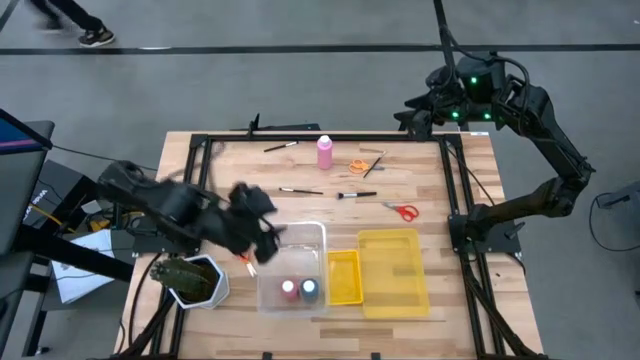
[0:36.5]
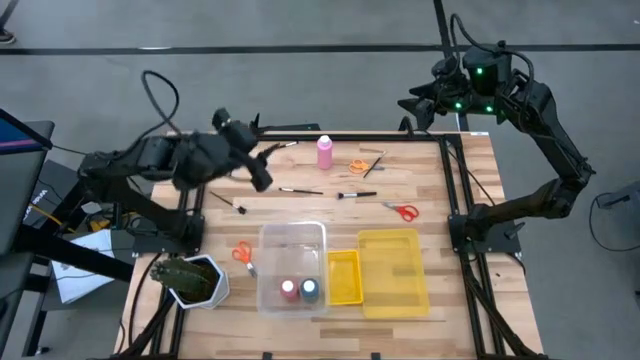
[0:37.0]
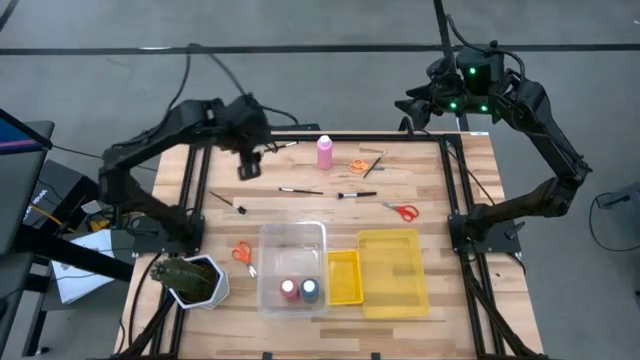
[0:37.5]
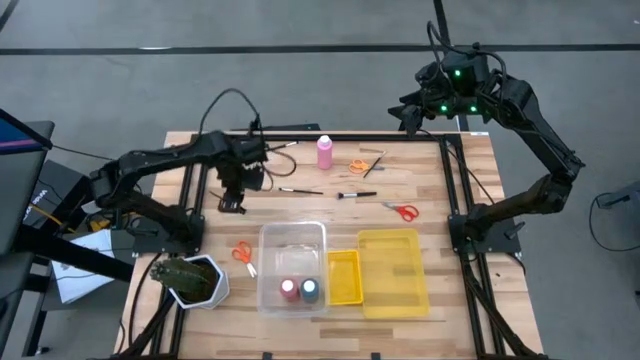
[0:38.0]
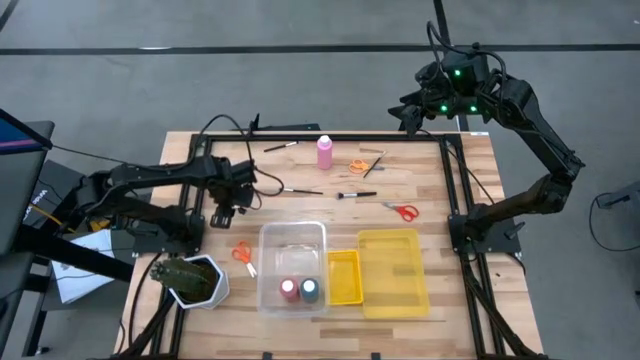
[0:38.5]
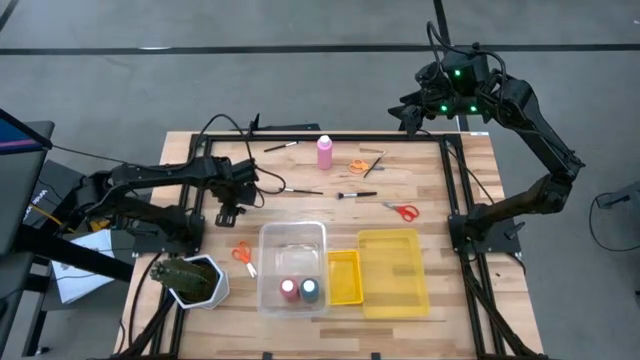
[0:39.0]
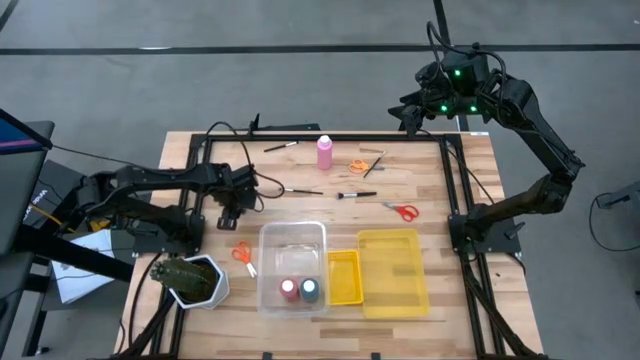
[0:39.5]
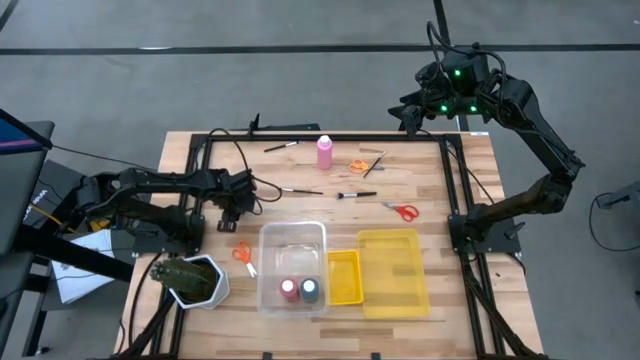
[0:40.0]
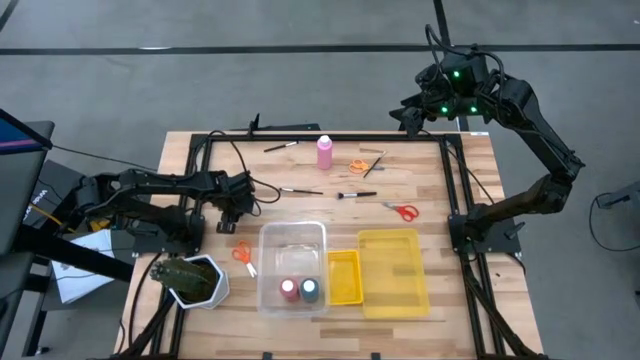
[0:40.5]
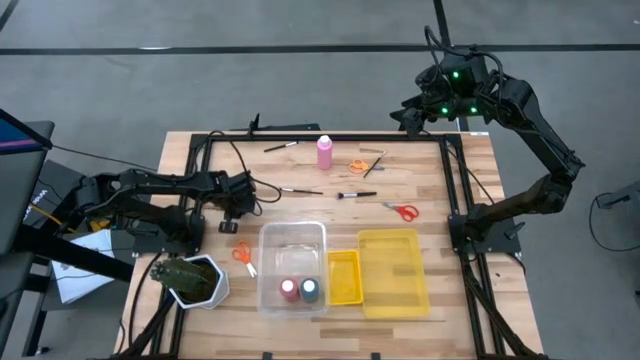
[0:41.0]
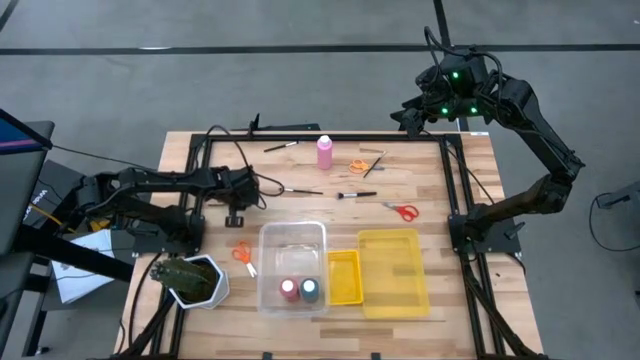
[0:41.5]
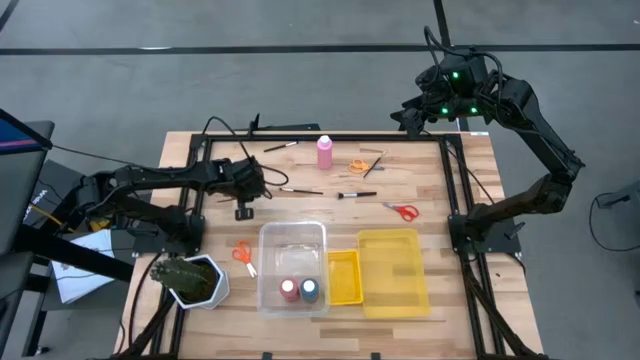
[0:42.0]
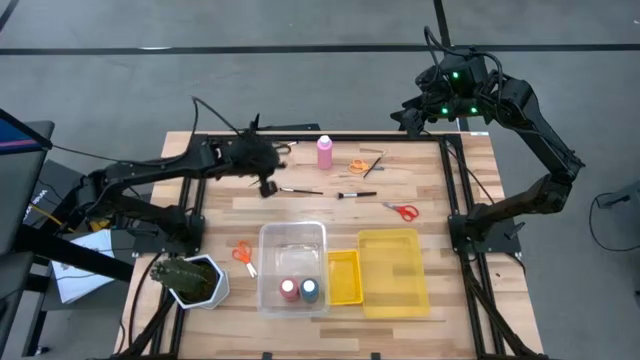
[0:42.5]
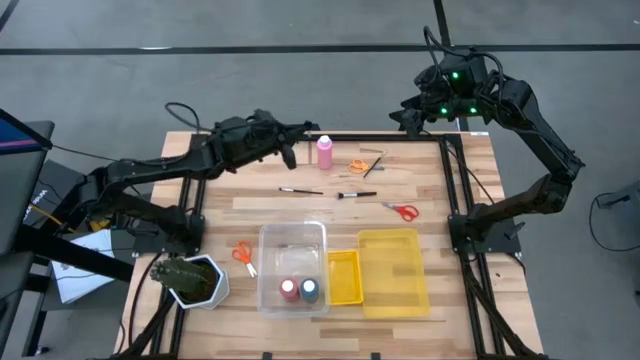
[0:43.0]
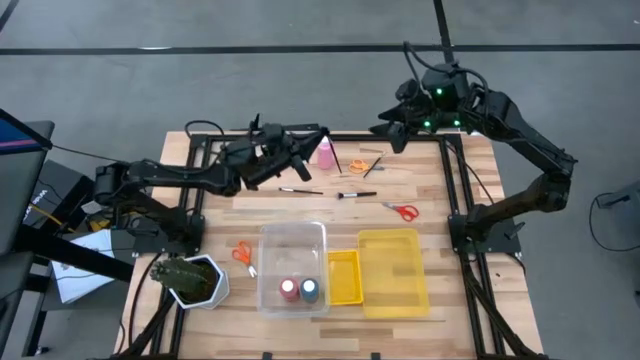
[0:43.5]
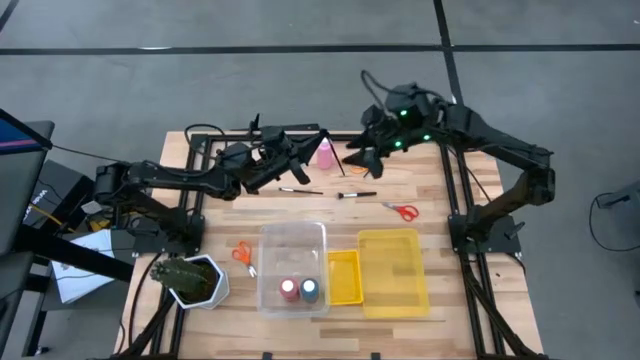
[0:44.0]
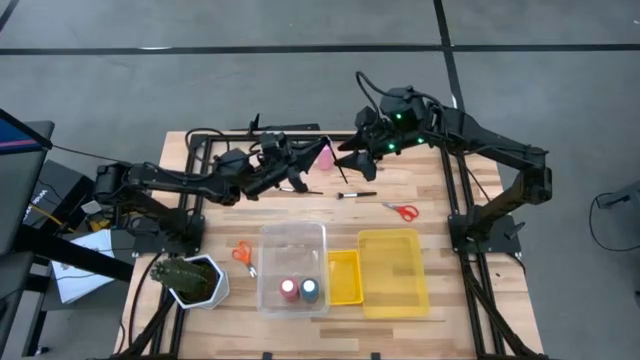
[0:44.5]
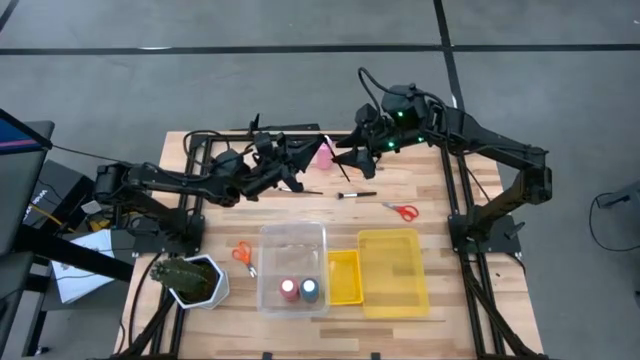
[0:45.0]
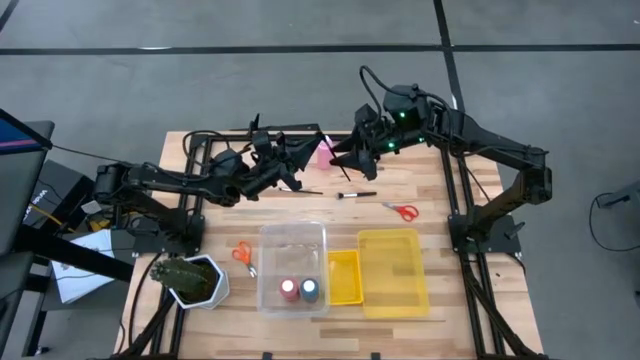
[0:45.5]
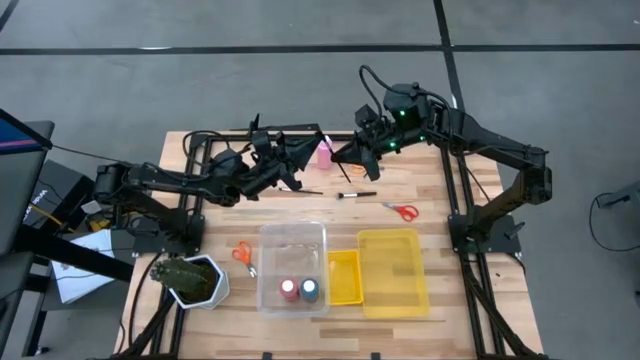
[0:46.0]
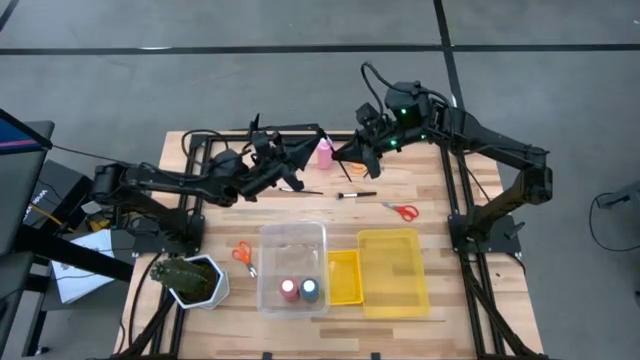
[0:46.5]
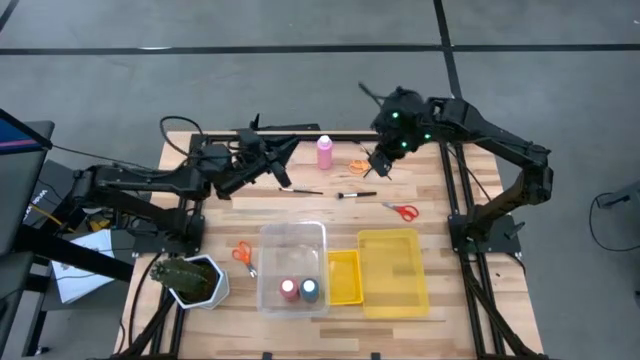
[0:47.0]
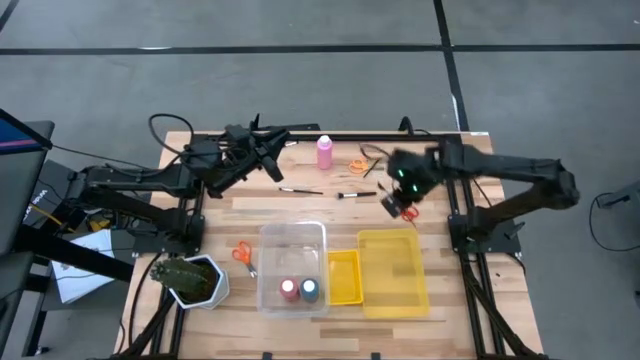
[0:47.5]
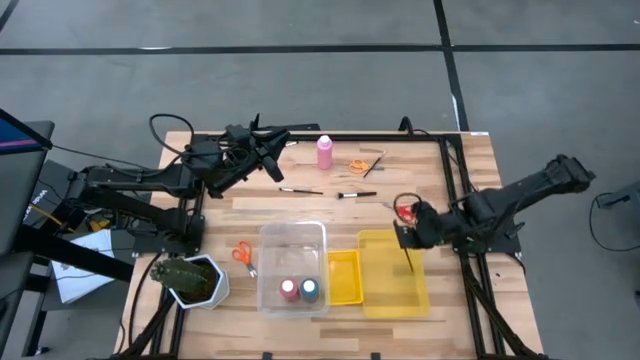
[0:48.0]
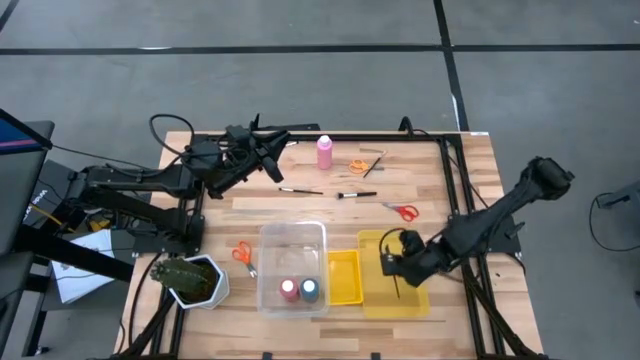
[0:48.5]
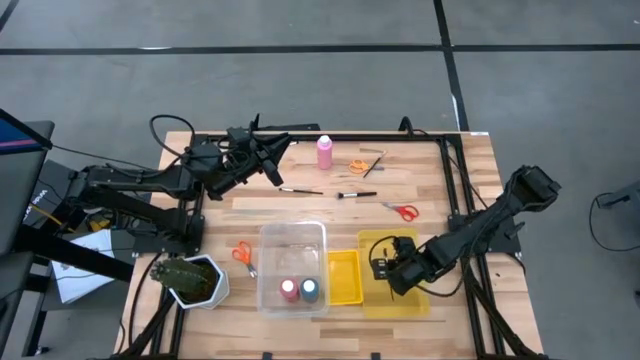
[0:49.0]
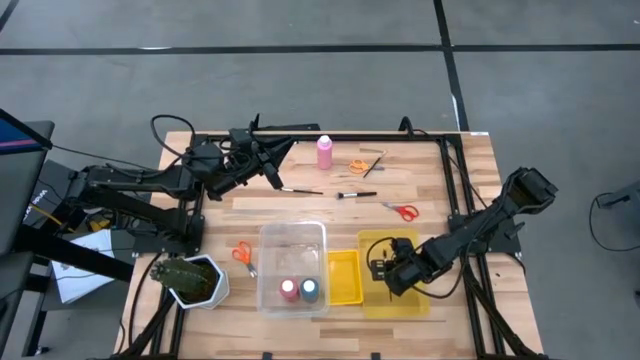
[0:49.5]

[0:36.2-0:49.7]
Task: Pick & Place Paint Supplies
Put the black paint brush into the right yellow bin

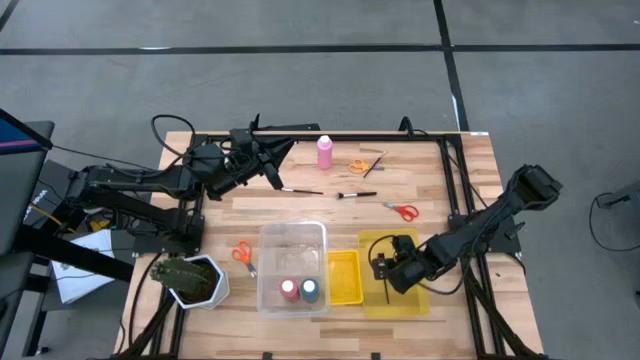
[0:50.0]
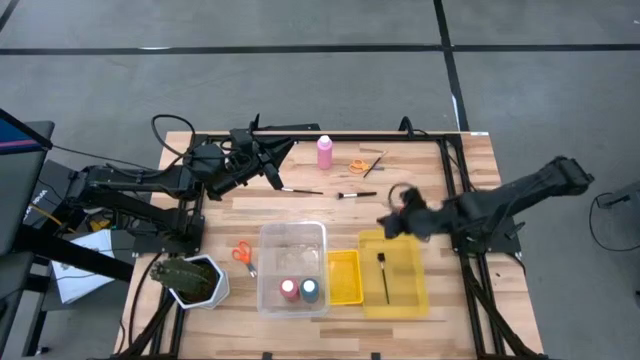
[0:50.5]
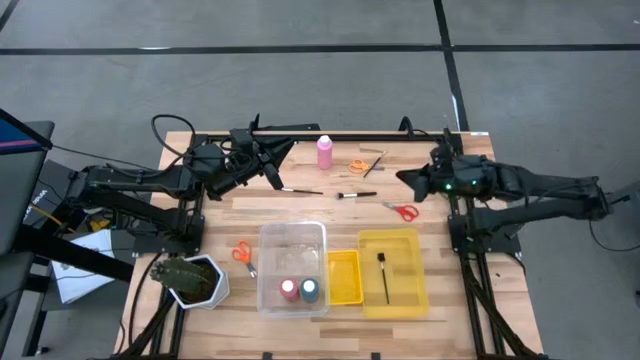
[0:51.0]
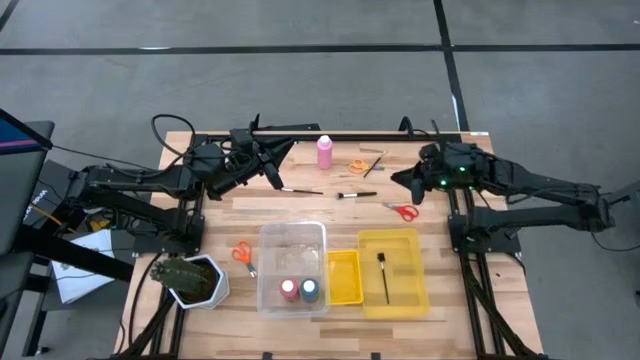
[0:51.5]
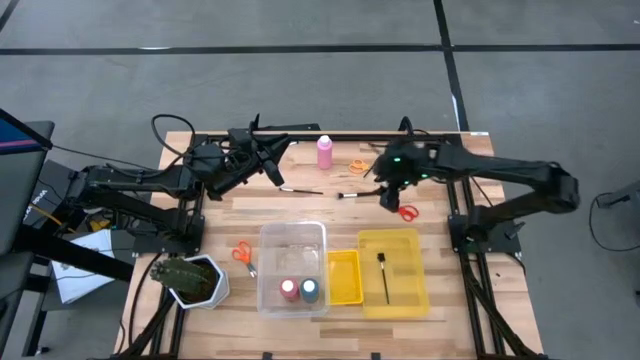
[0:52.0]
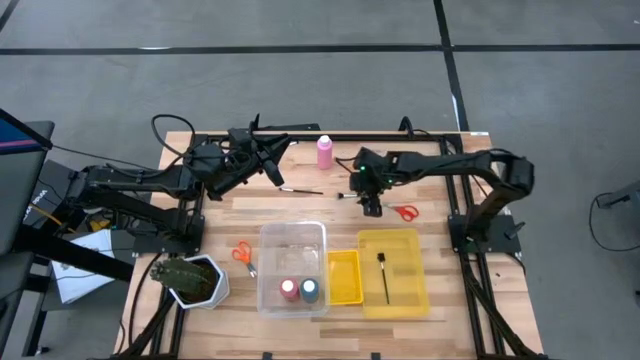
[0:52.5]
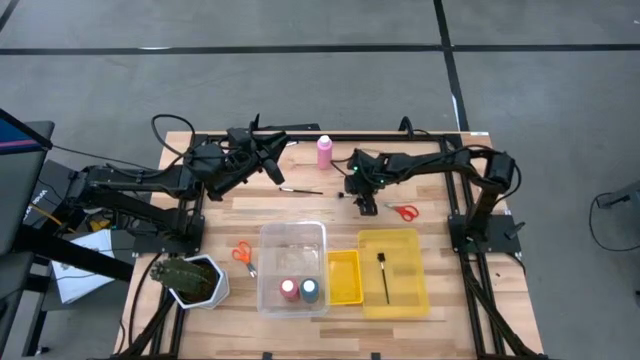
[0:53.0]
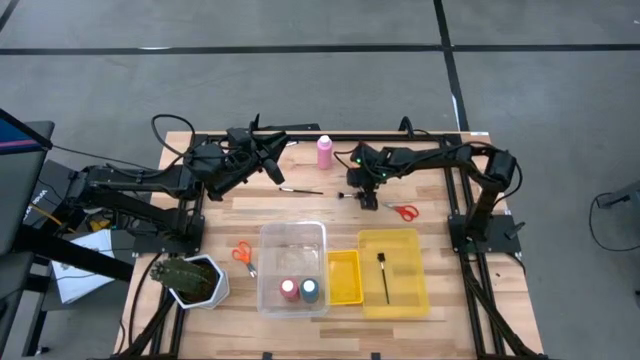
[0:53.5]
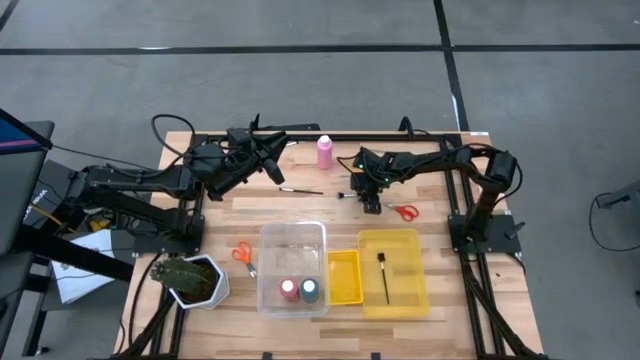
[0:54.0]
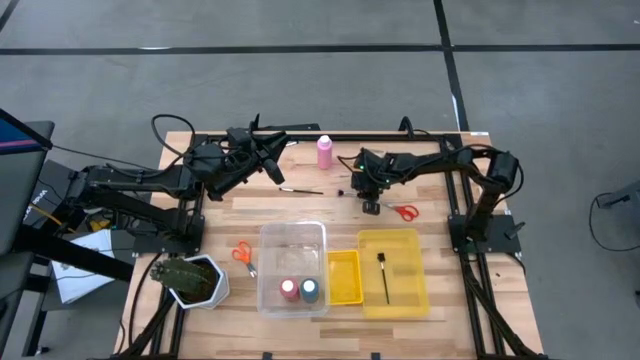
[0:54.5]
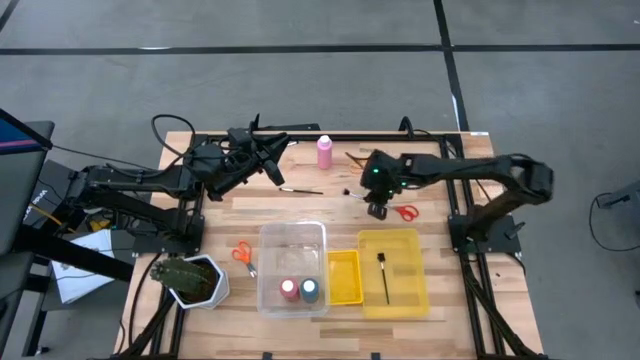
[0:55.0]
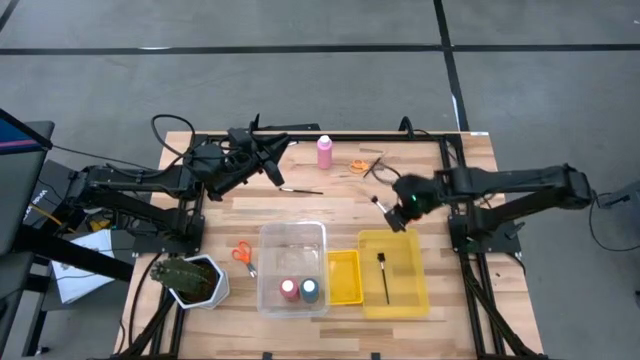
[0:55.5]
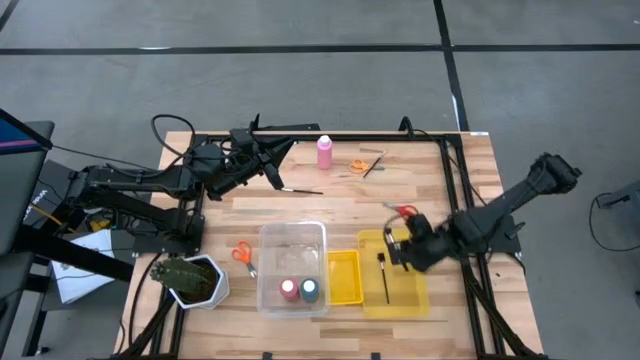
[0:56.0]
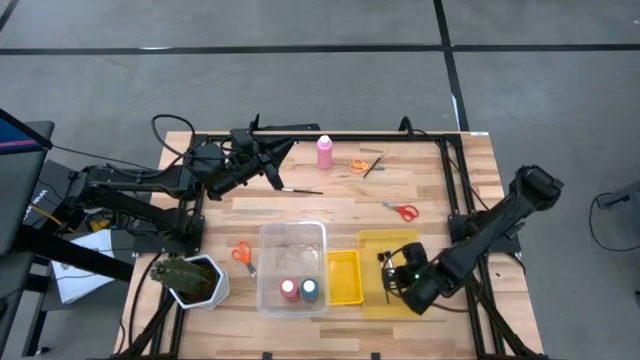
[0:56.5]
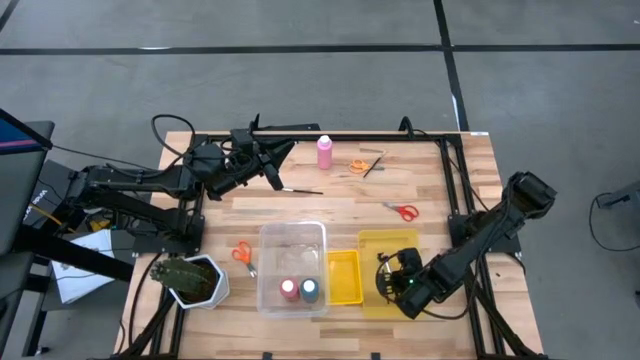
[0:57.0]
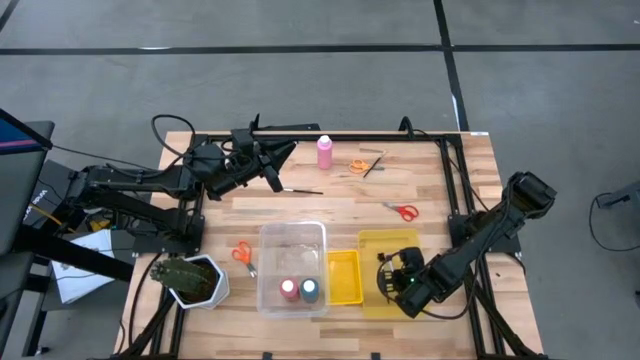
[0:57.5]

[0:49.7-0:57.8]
Put the black paint brush into the right yellow bin
